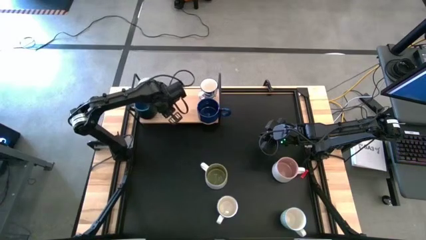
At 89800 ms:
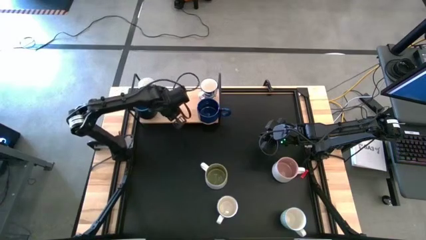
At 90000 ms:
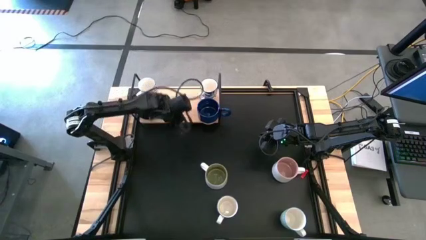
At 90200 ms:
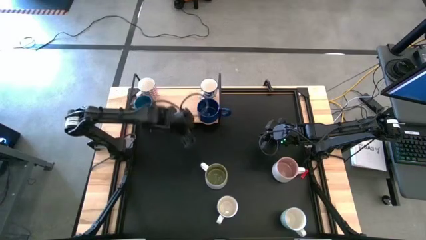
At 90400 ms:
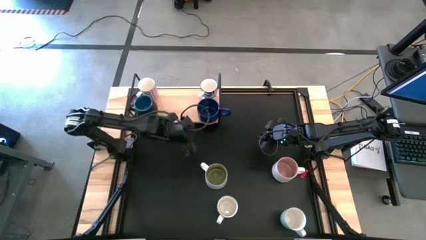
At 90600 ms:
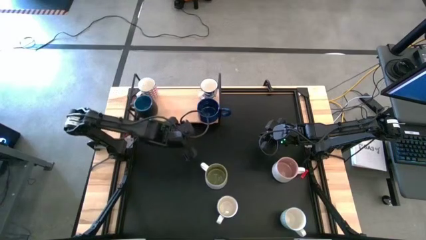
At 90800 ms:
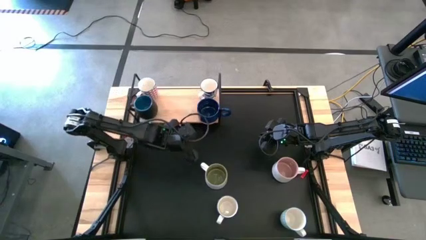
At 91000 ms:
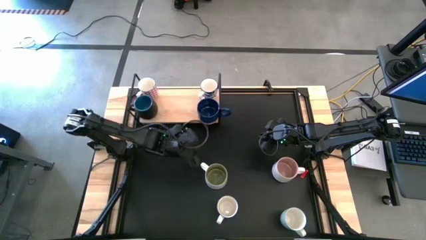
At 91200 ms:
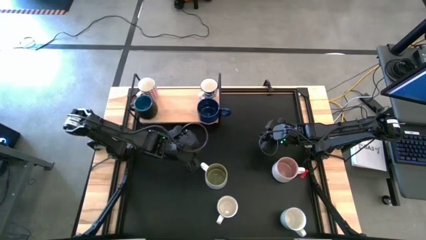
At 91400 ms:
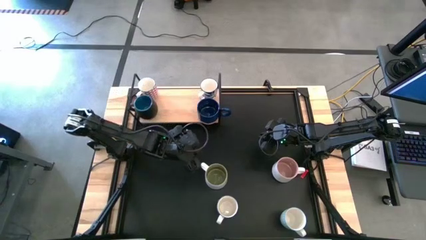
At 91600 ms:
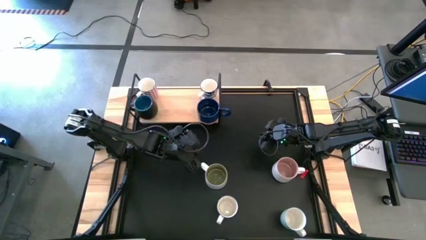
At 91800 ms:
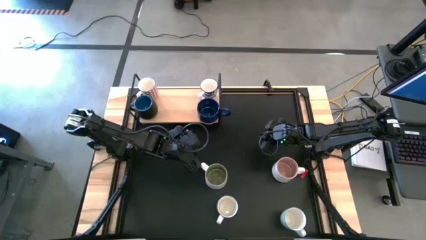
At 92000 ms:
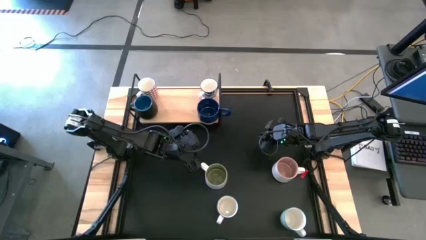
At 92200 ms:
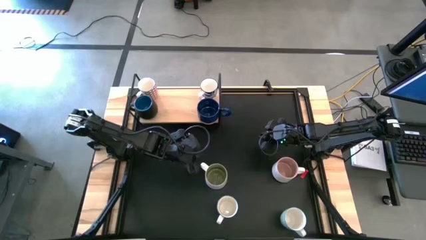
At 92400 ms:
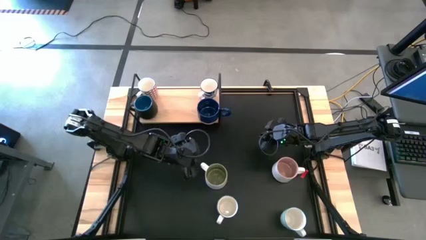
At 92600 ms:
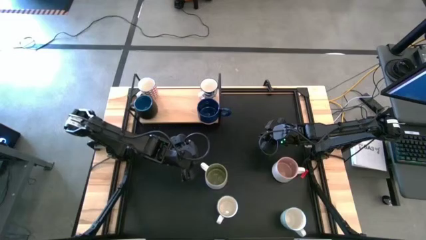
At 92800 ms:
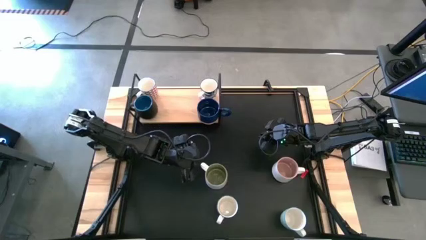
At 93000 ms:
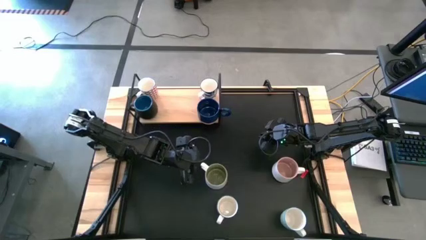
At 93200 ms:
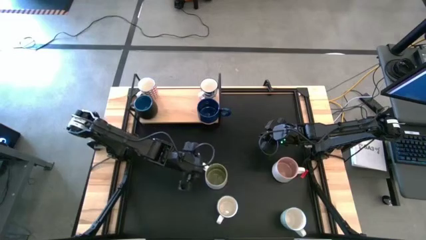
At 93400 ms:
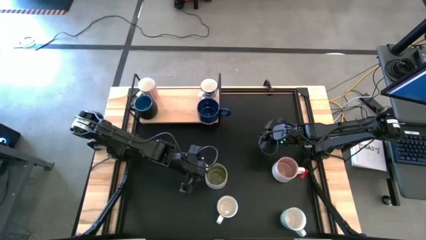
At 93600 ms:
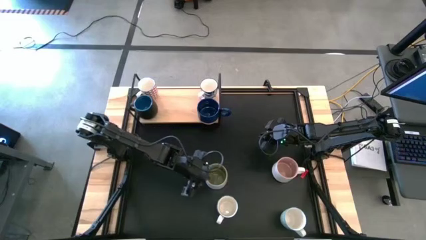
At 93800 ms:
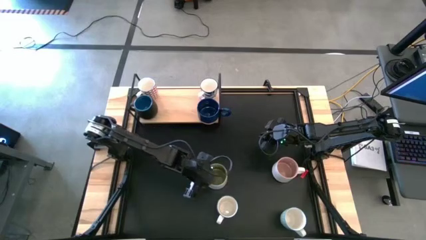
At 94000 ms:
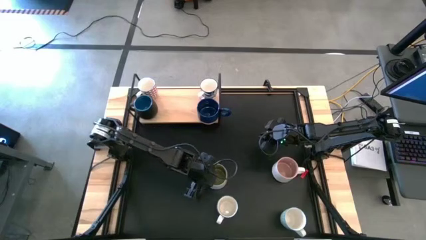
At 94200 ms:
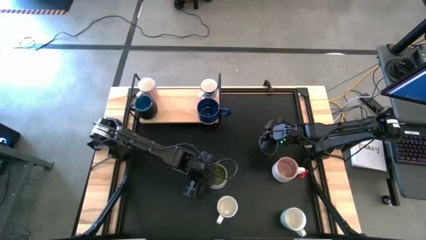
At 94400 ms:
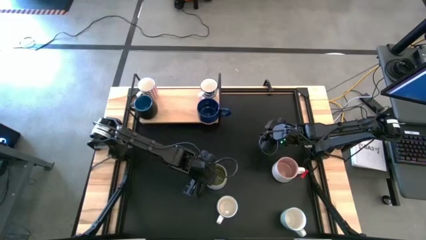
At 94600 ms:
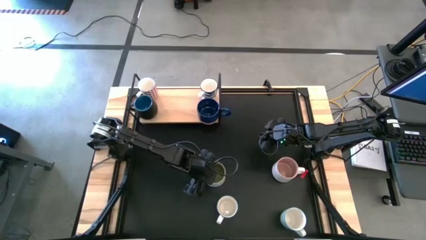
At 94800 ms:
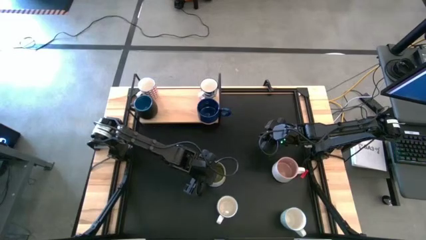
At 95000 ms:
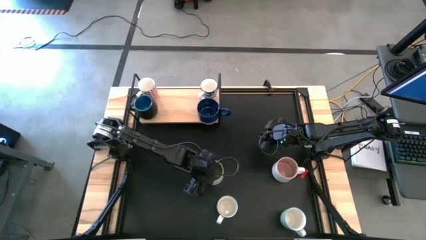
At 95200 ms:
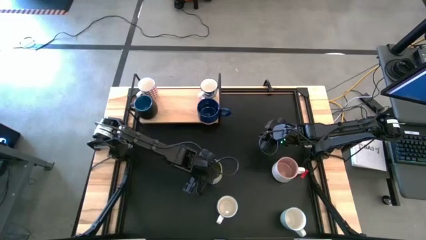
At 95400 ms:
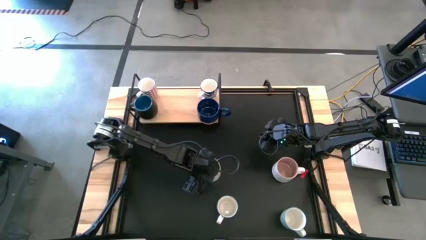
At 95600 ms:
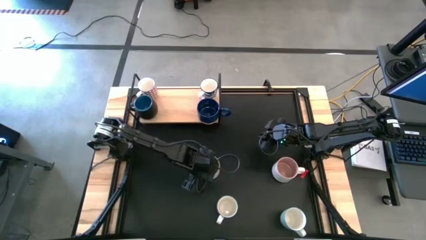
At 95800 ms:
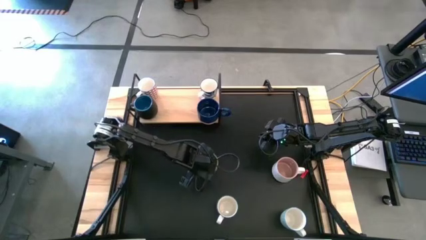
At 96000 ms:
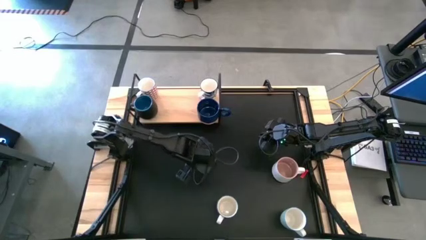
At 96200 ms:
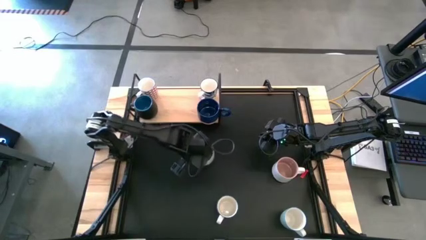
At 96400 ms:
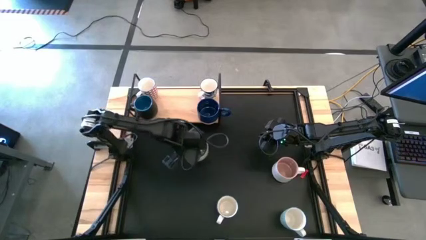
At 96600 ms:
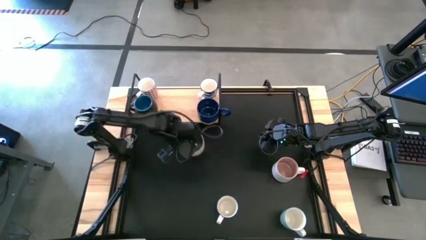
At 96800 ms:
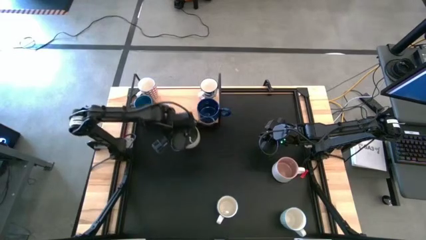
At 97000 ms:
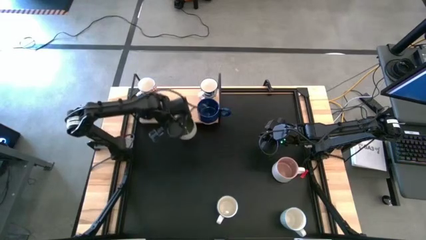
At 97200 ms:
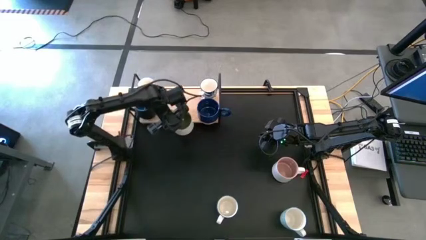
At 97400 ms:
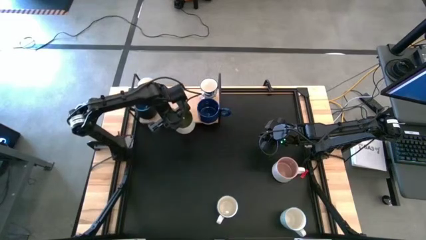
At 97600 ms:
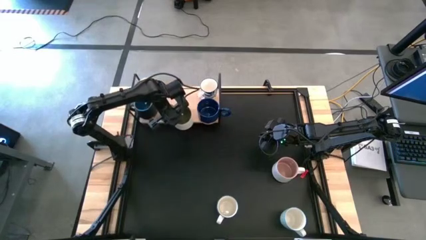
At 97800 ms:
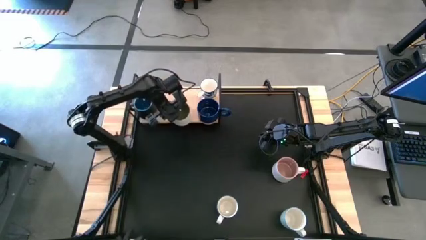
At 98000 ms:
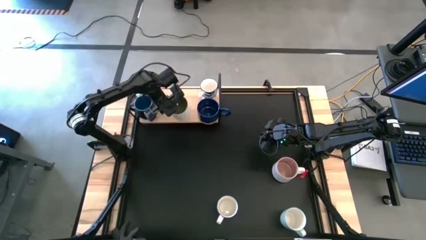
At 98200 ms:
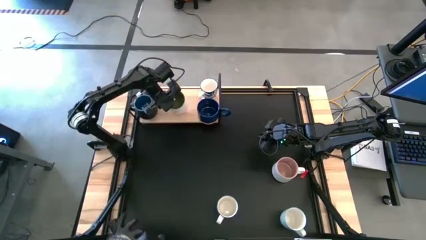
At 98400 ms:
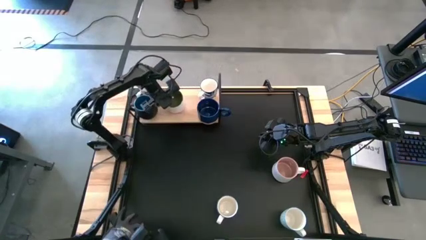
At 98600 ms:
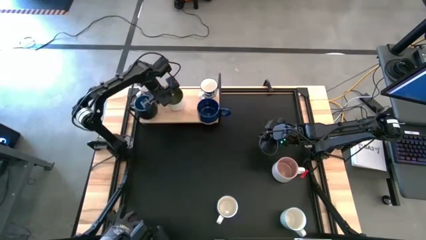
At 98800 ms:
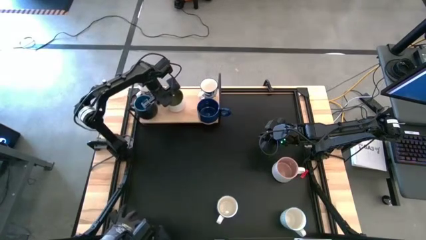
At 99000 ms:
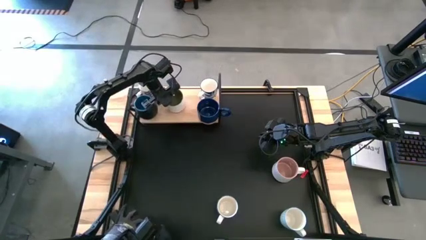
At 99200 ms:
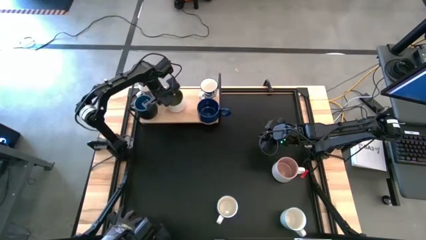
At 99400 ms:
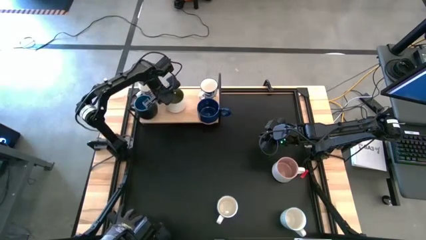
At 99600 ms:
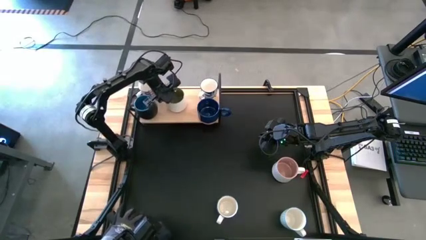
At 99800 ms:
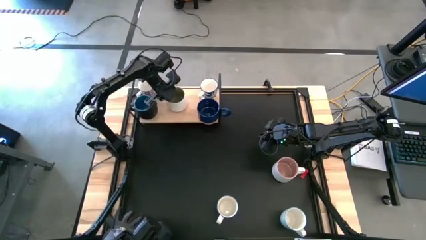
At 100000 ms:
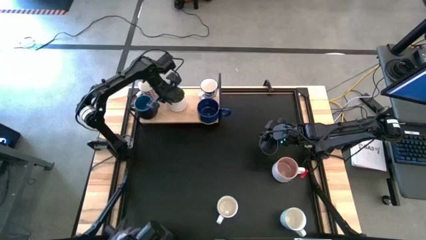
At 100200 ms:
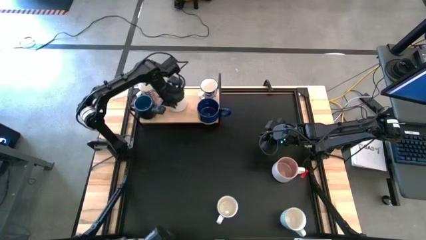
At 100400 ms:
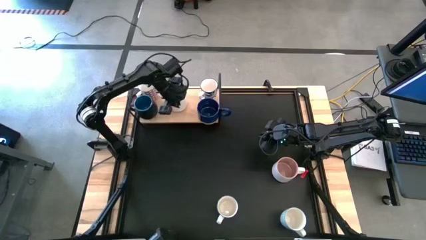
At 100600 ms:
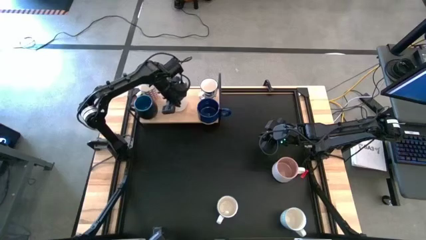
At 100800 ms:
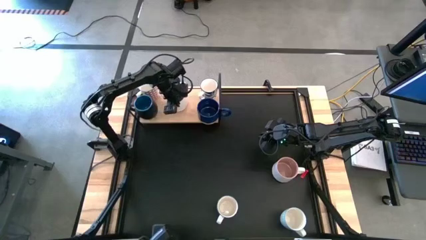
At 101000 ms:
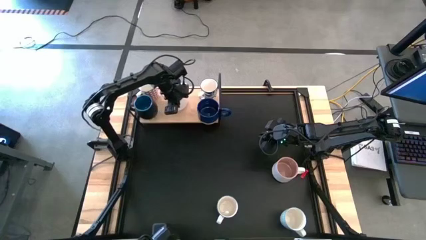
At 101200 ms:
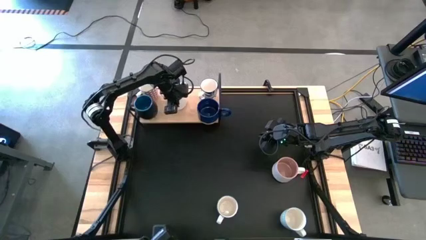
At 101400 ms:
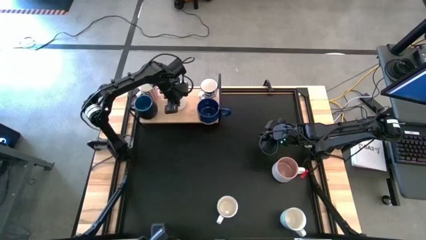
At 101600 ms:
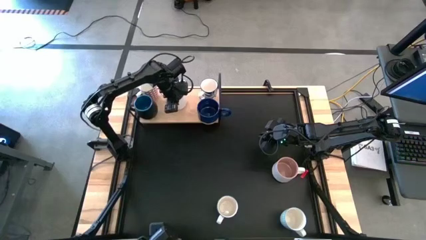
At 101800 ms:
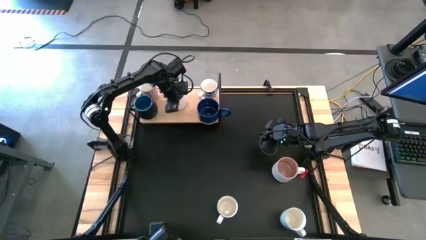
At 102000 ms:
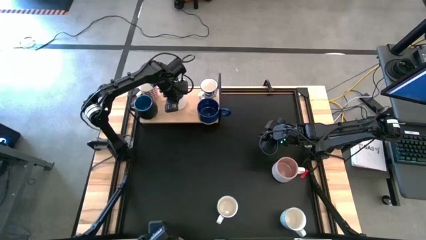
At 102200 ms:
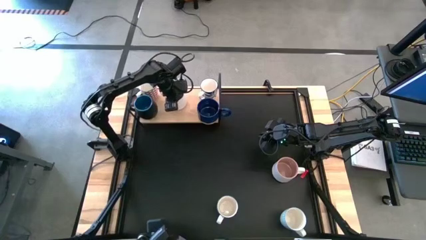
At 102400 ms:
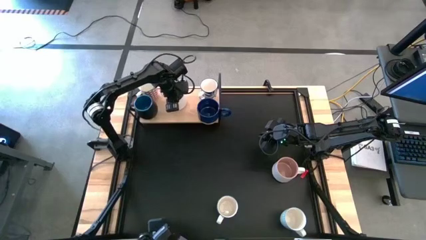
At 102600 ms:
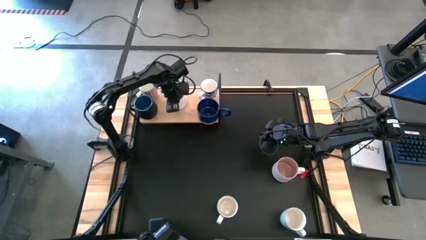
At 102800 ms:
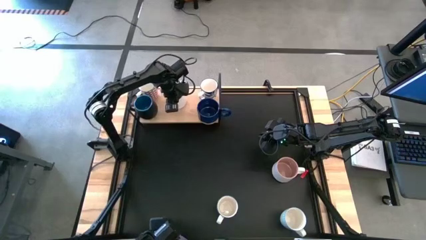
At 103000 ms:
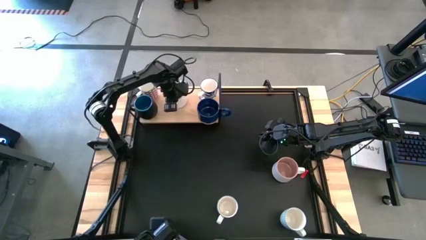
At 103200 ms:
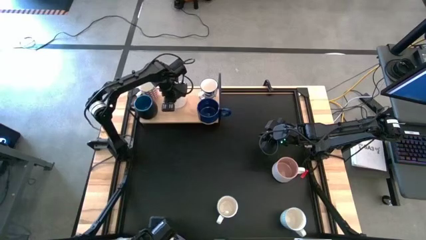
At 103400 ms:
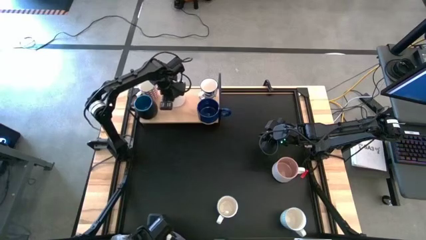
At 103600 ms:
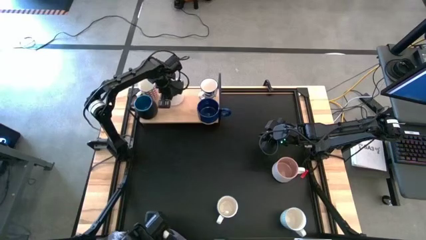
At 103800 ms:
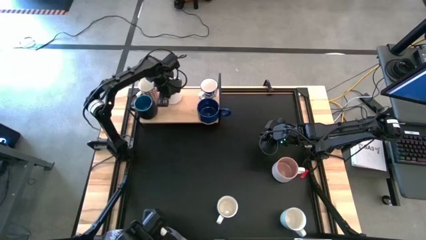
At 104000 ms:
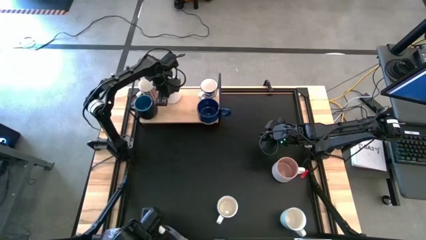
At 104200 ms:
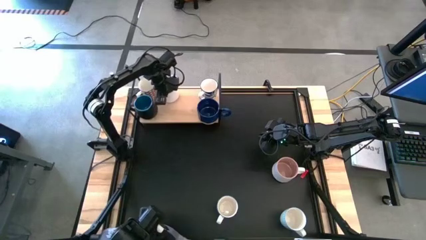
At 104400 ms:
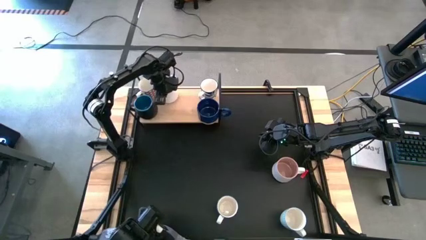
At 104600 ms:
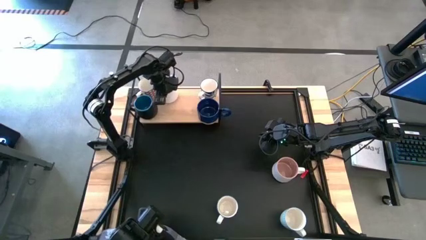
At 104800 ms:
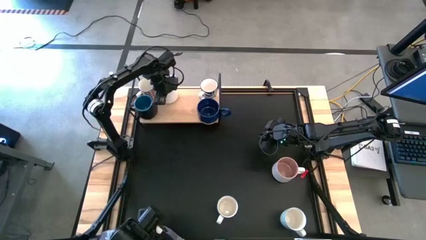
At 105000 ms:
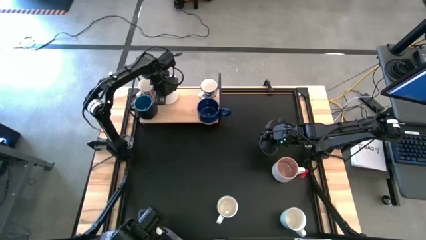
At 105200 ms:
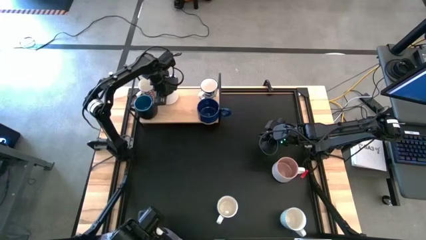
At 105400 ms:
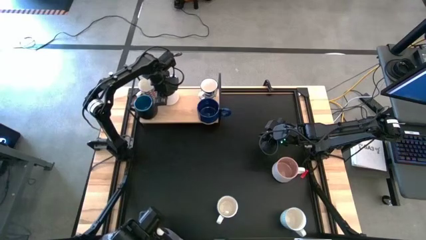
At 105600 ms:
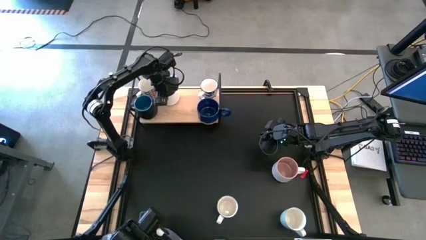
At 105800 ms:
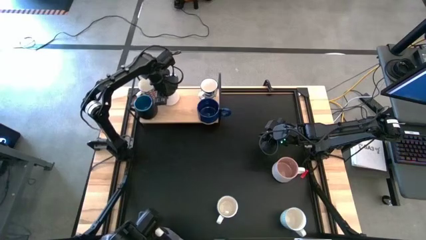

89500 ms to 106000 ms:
Task: Place coffee mugs
Put the white-green mug on the shelf
